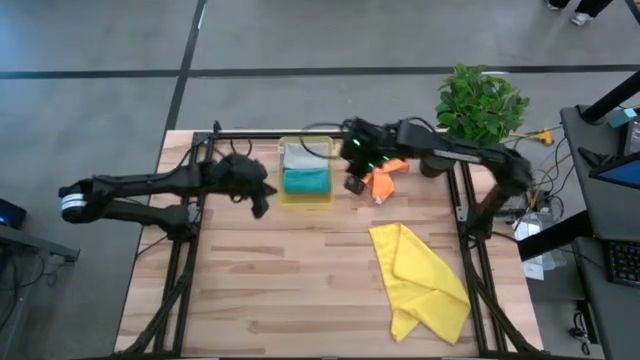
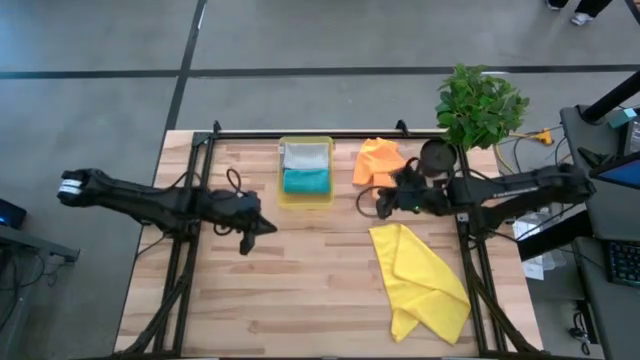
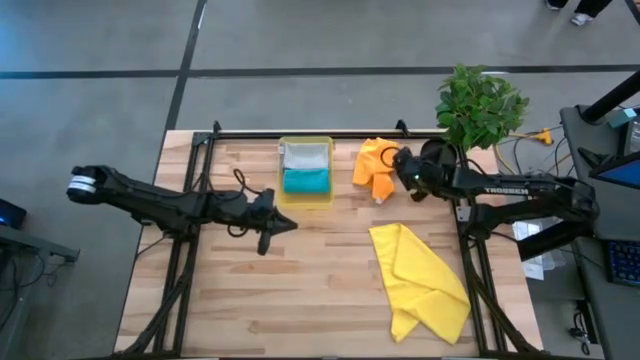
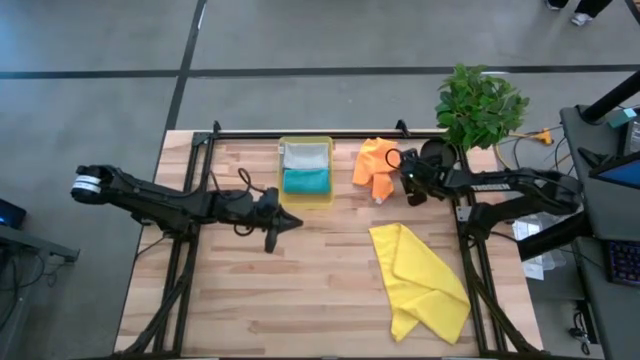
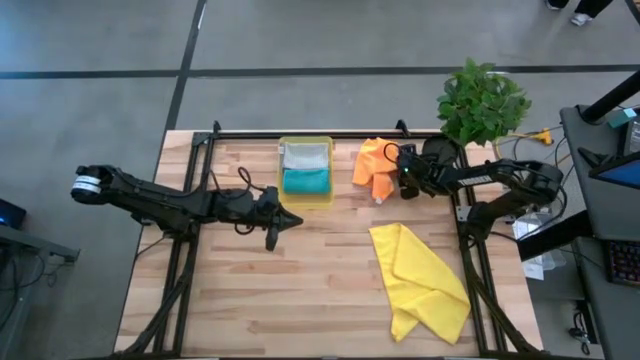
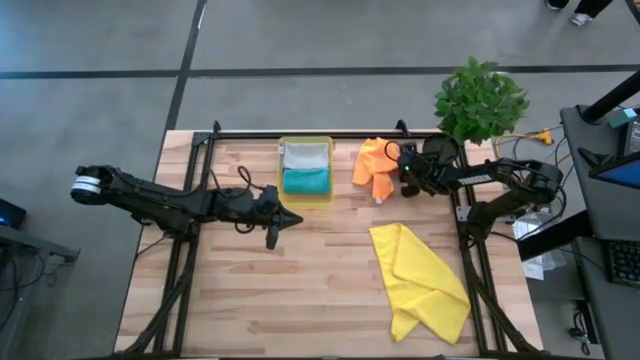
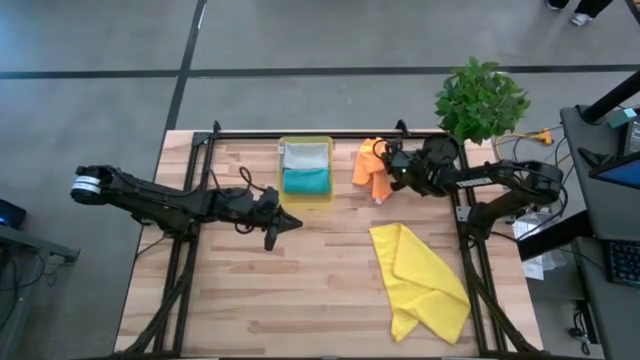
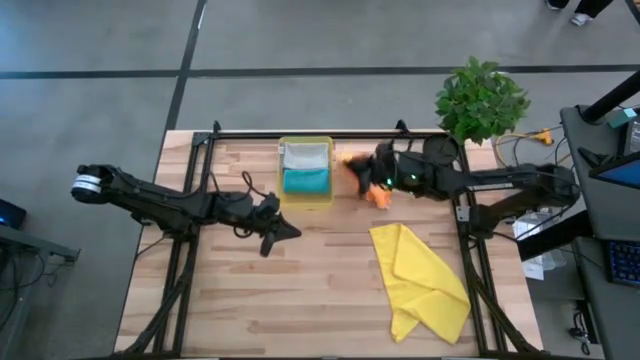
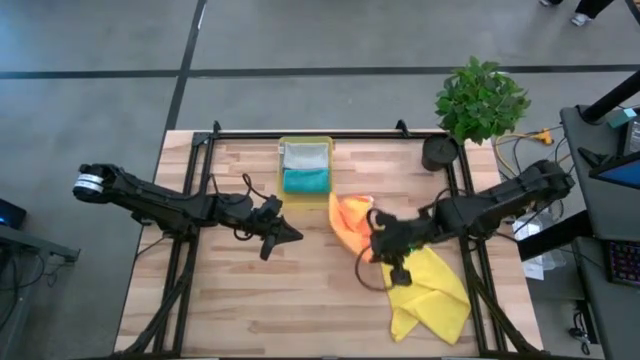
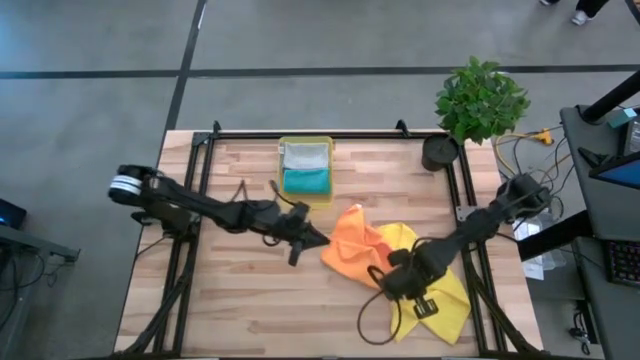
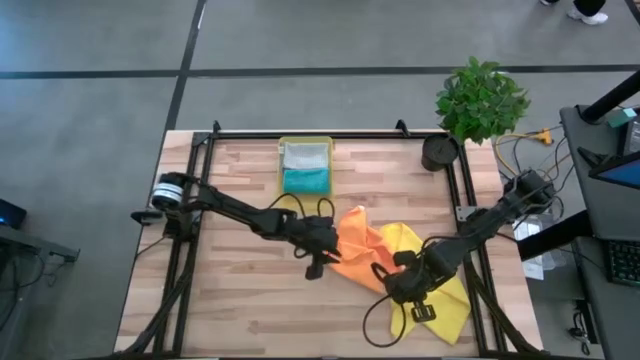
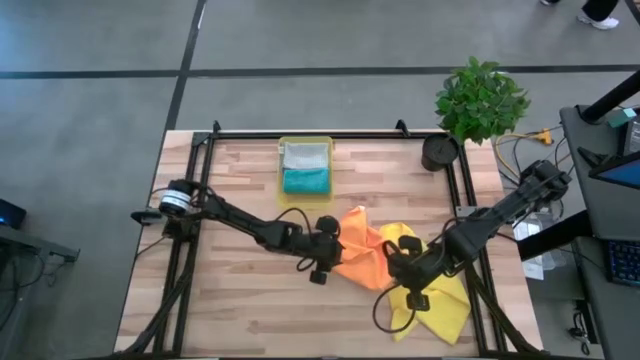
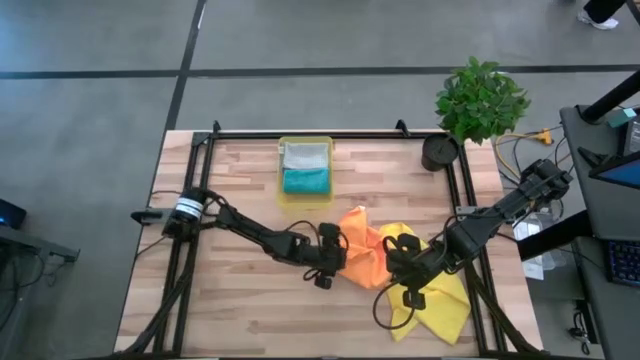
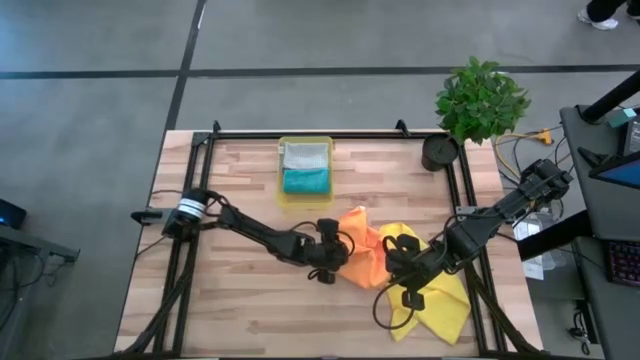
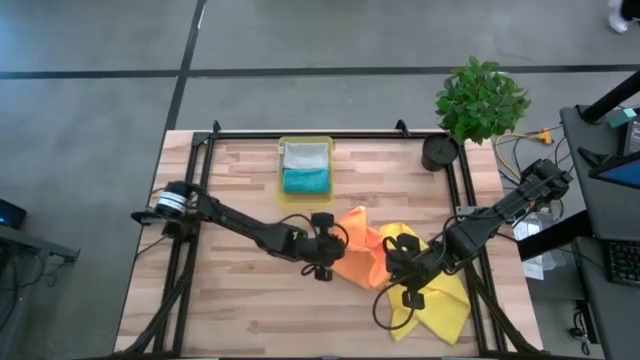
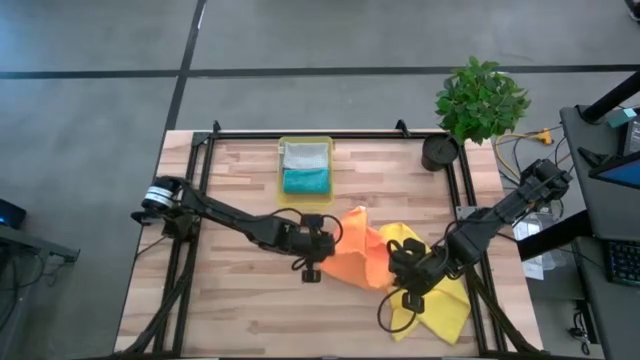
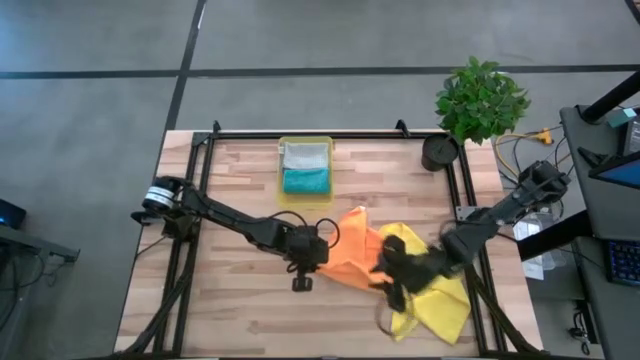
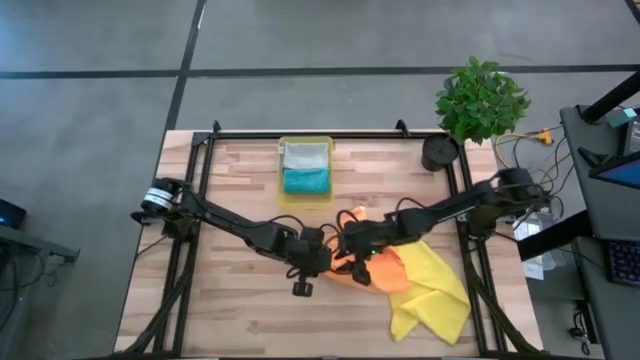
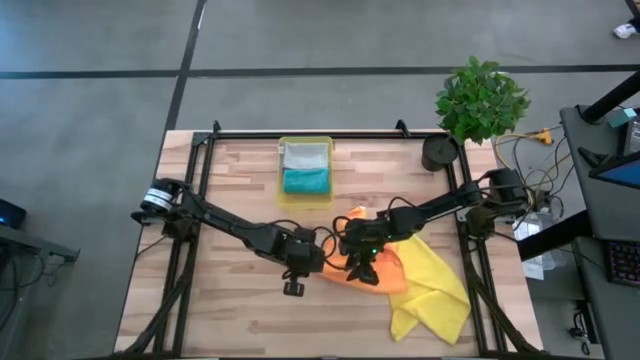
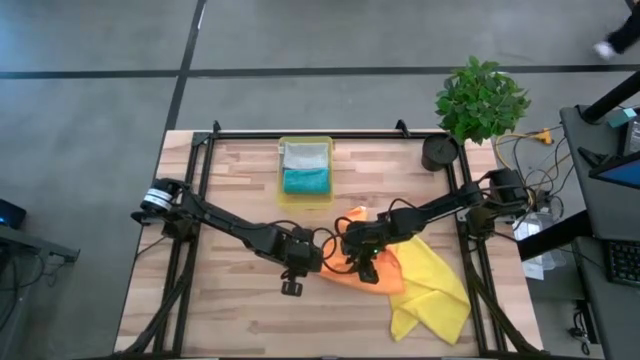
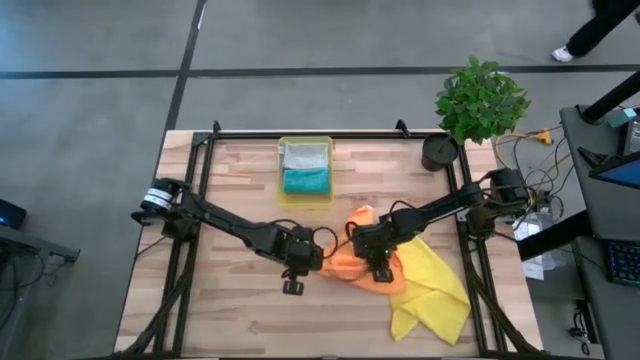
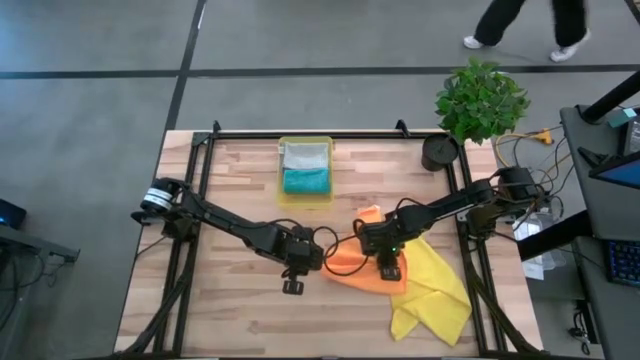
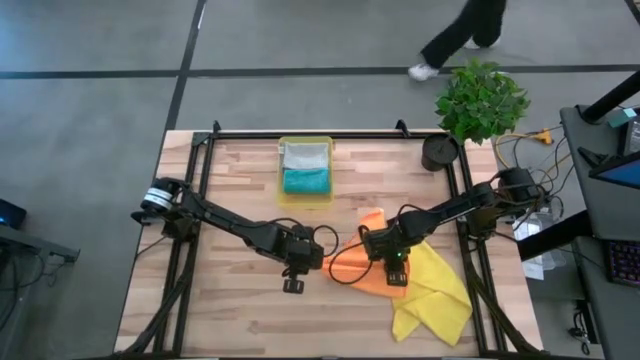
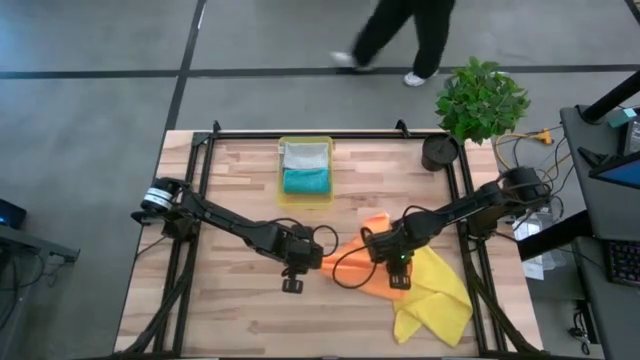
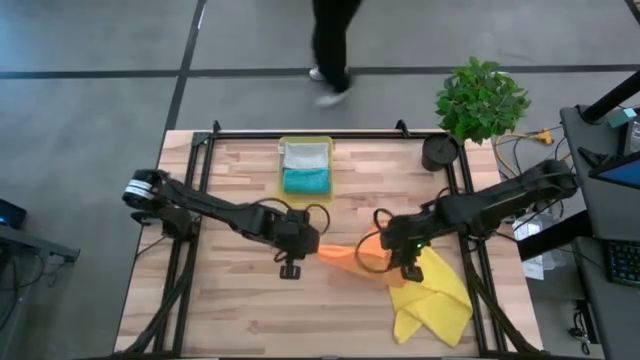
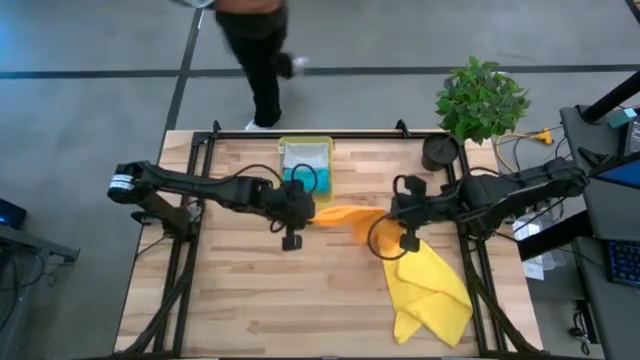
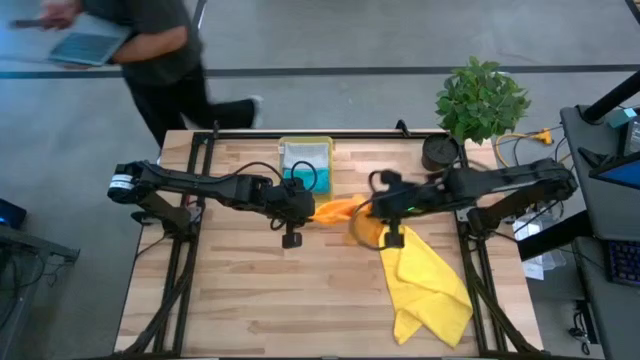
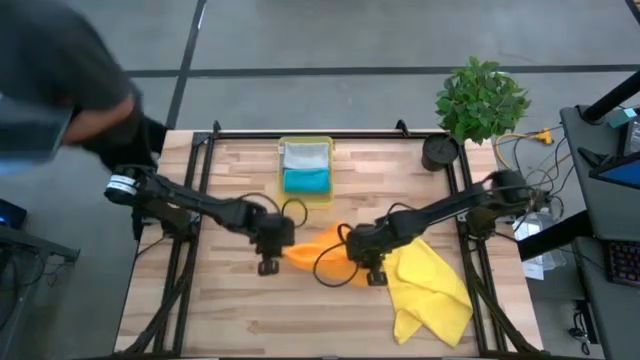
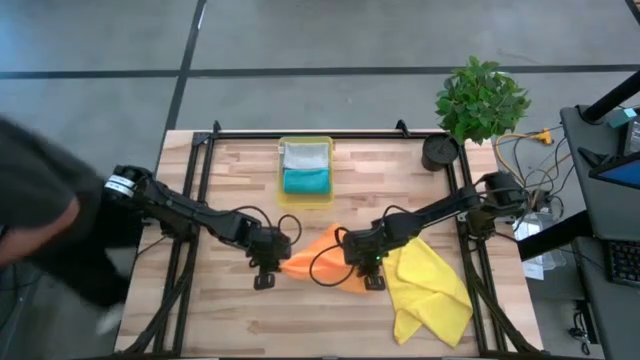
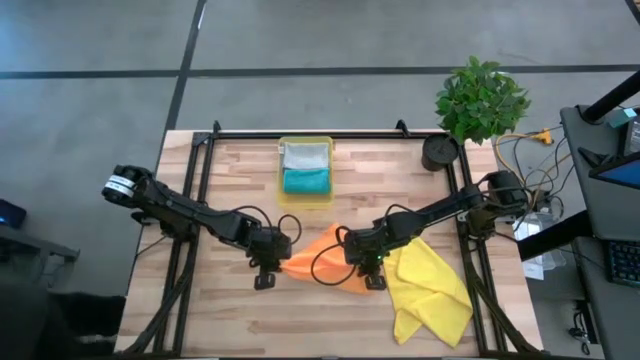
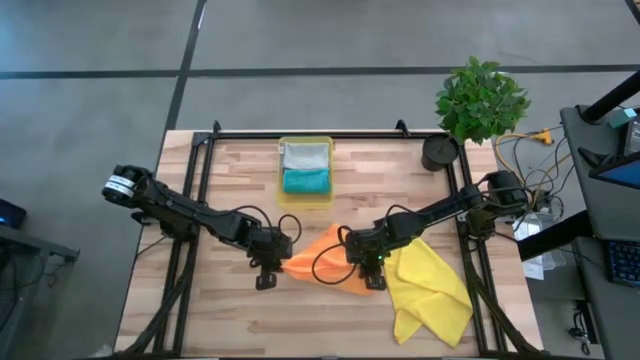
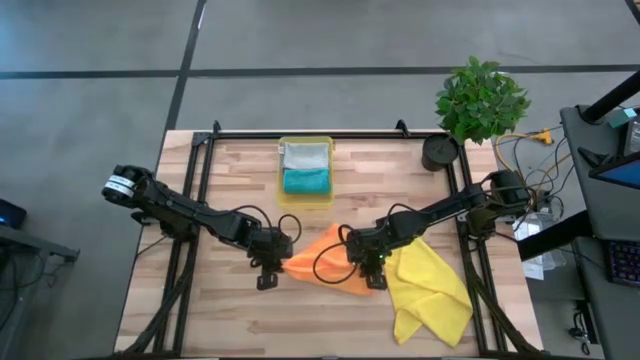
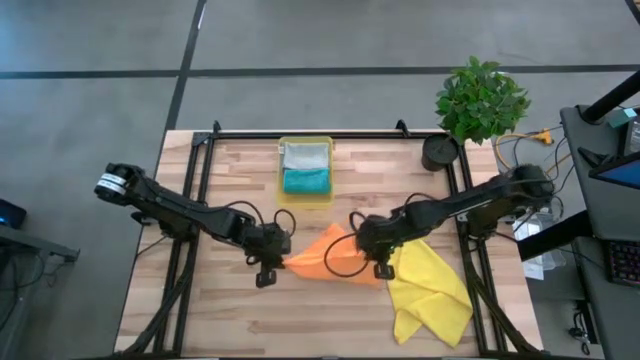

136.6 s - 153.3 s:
Task: Fold microfiber towels
Fold the orange microfiber cloth

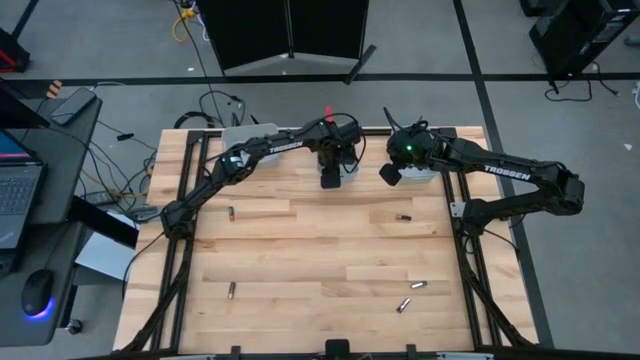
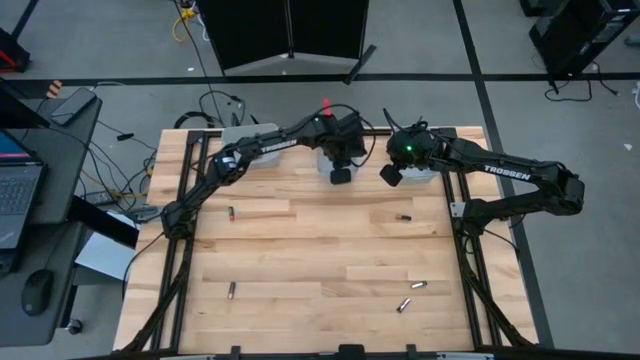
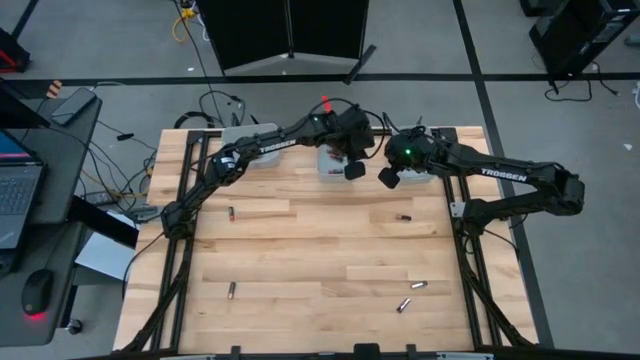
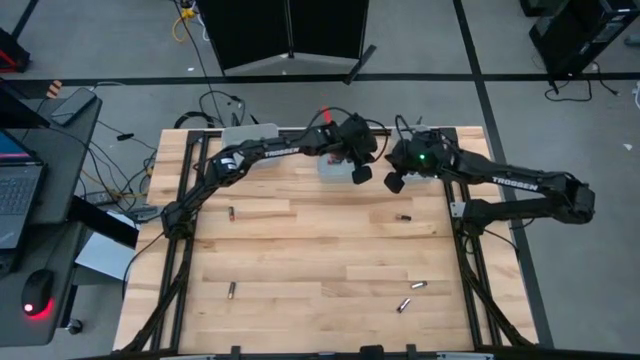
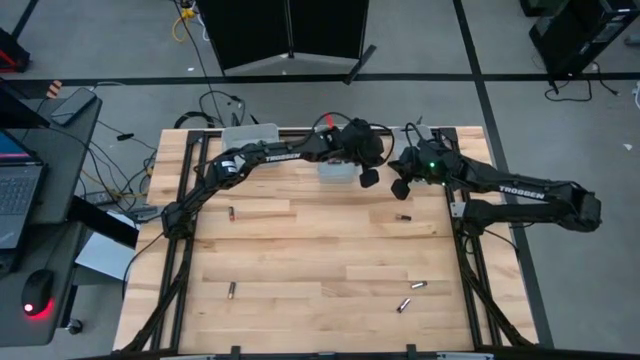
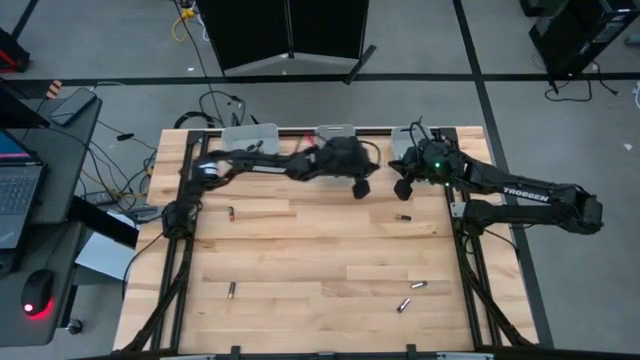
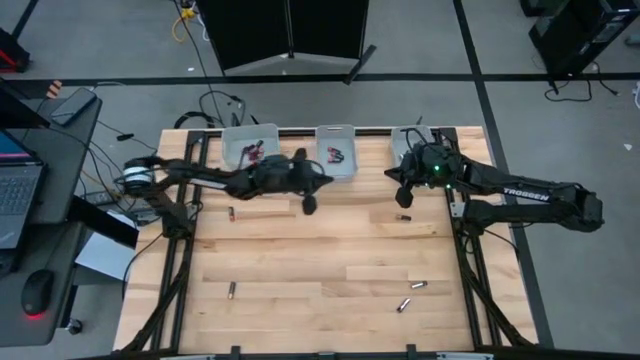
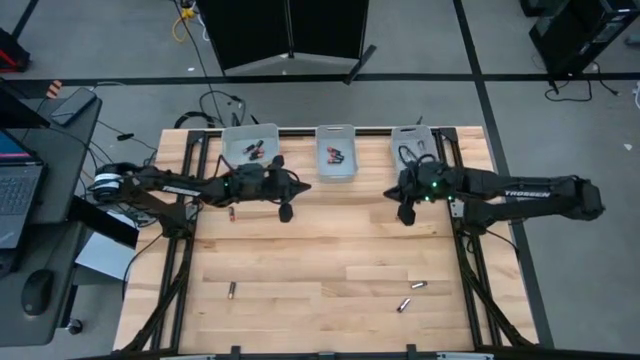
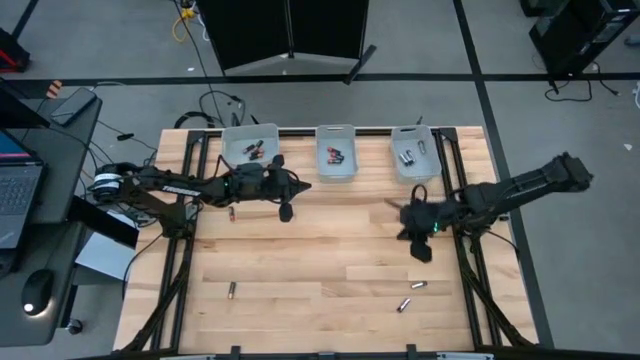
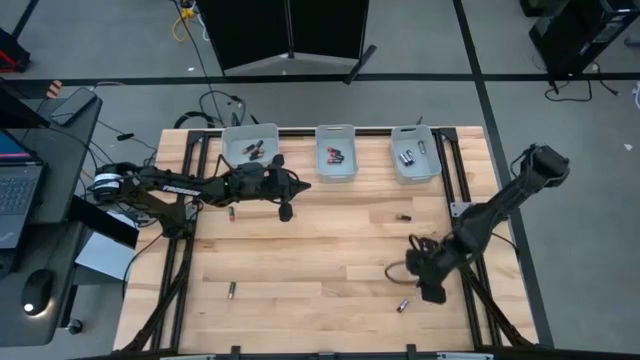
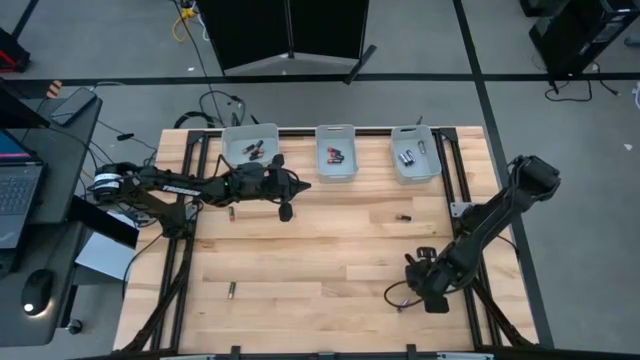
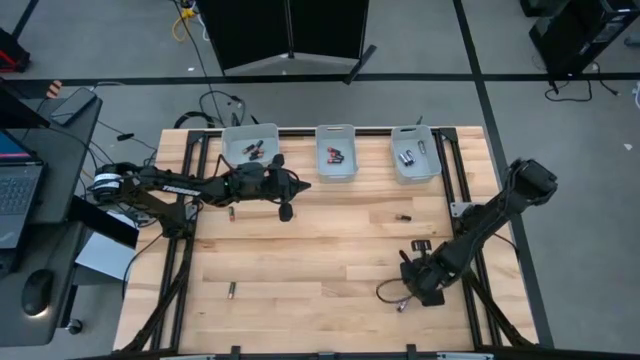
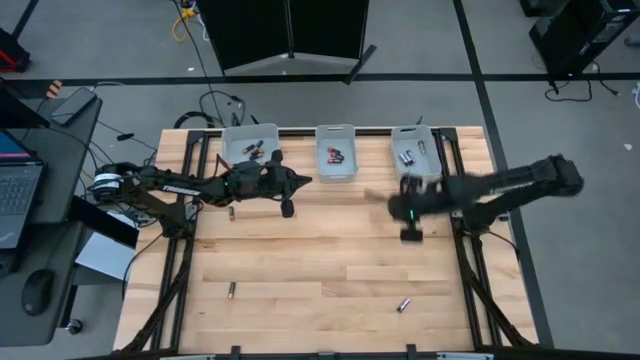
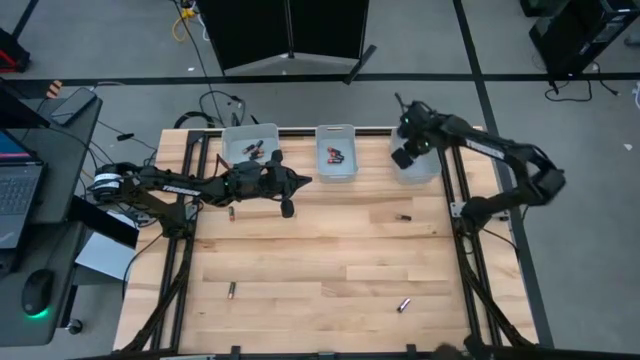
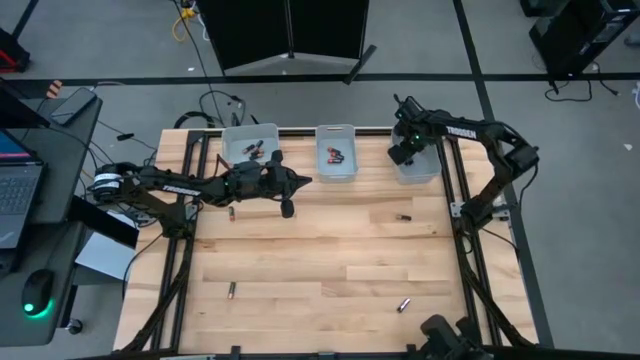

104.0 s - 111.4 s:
Task: Sort batteries
Put the top black silver battery into the right bin
